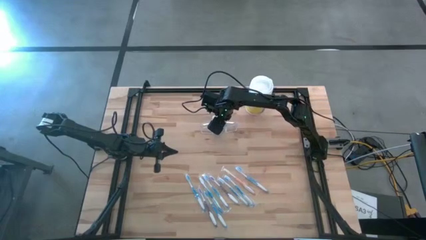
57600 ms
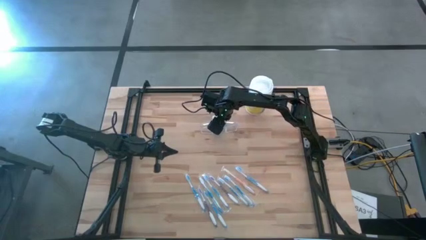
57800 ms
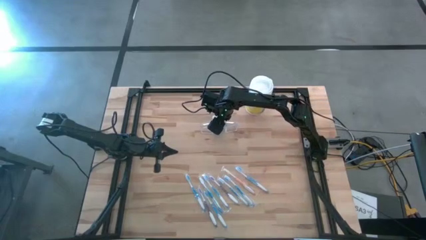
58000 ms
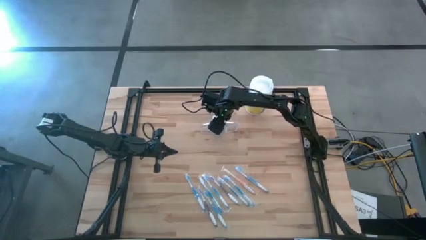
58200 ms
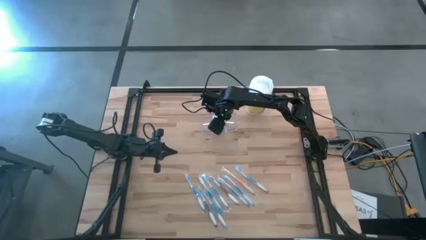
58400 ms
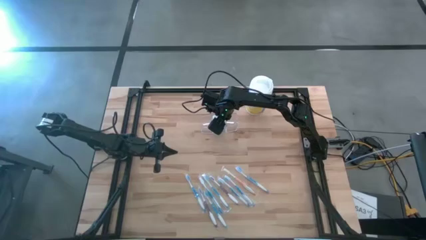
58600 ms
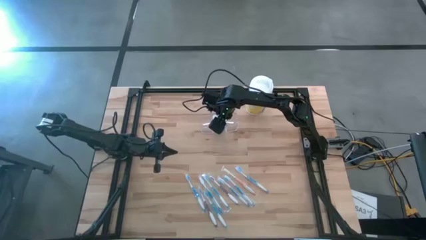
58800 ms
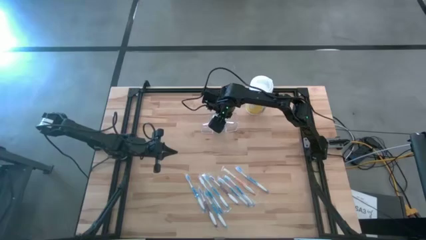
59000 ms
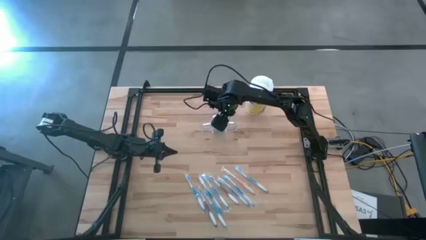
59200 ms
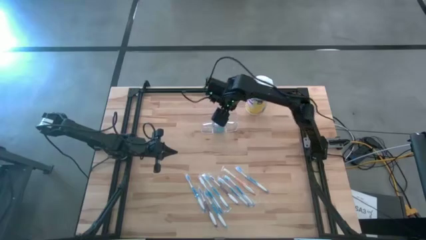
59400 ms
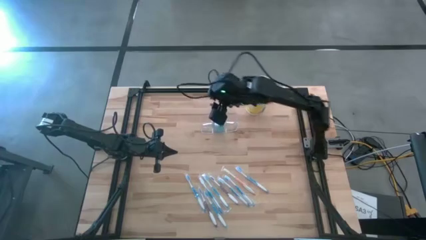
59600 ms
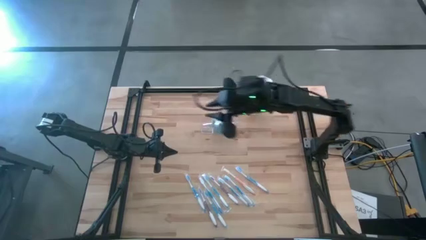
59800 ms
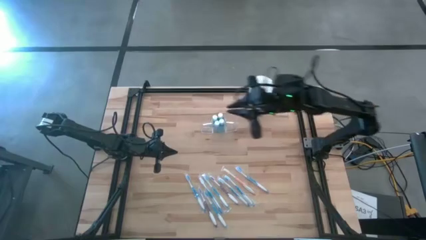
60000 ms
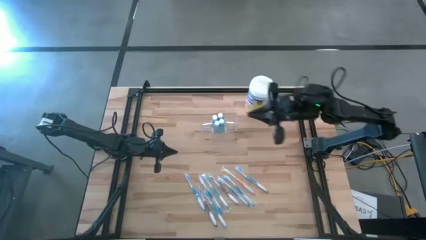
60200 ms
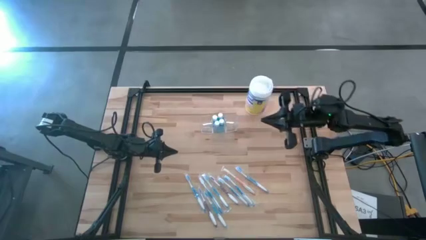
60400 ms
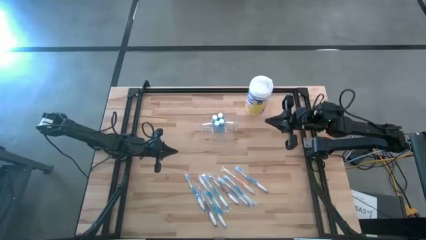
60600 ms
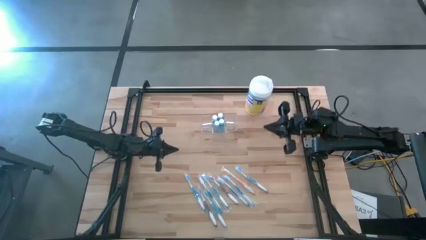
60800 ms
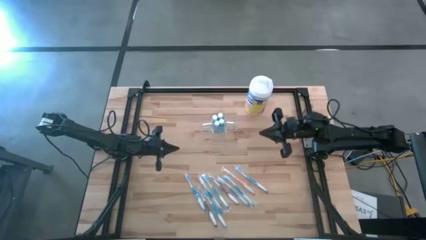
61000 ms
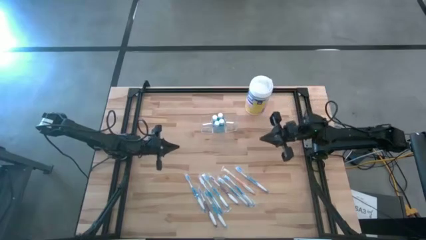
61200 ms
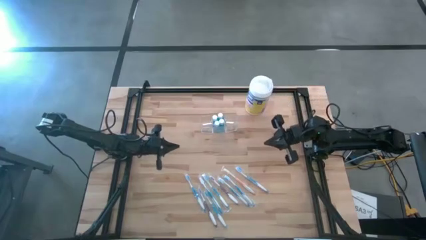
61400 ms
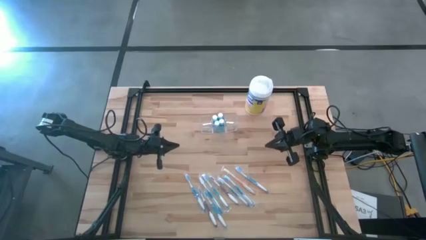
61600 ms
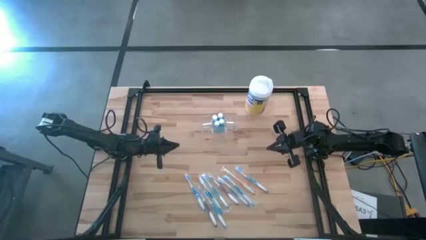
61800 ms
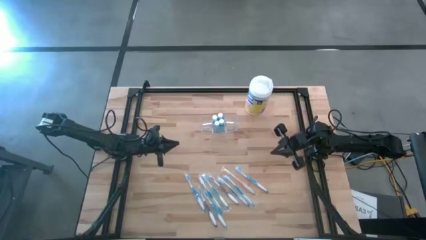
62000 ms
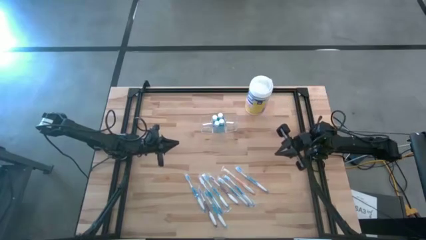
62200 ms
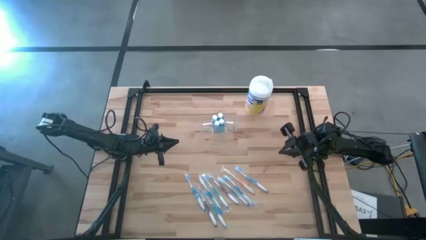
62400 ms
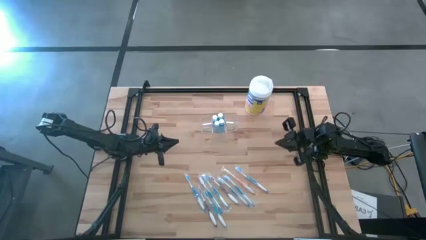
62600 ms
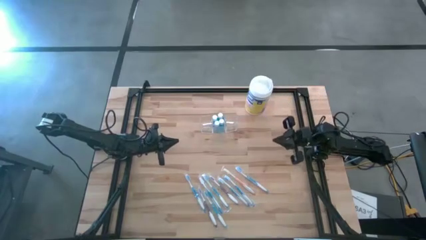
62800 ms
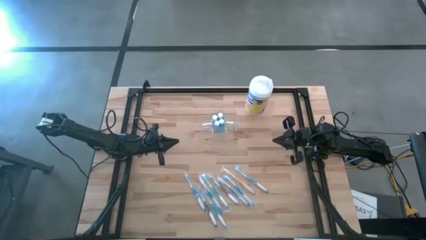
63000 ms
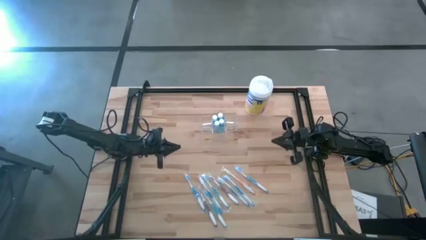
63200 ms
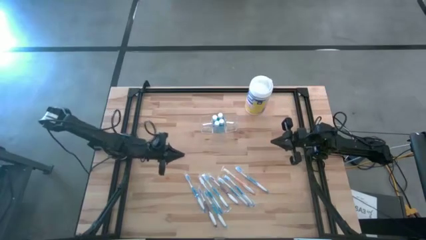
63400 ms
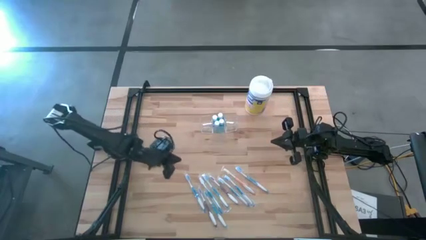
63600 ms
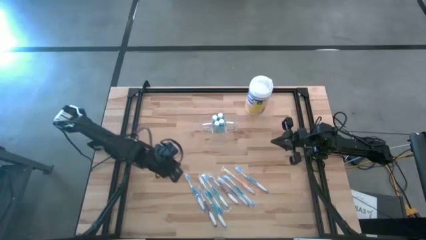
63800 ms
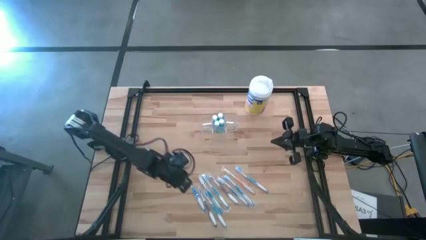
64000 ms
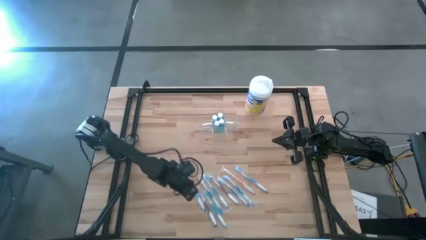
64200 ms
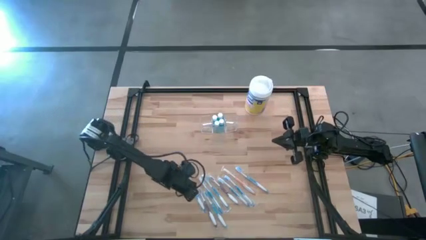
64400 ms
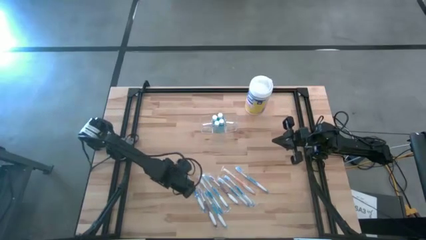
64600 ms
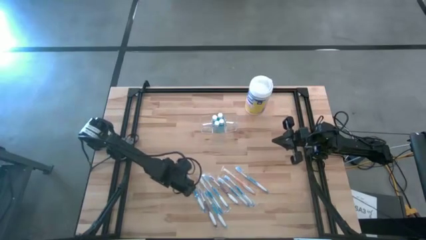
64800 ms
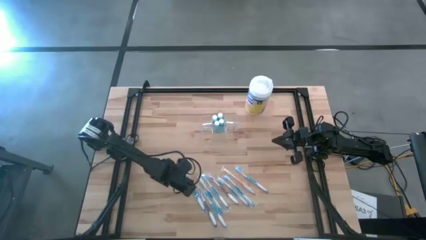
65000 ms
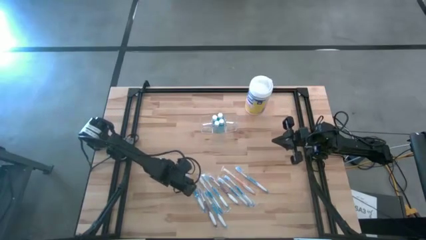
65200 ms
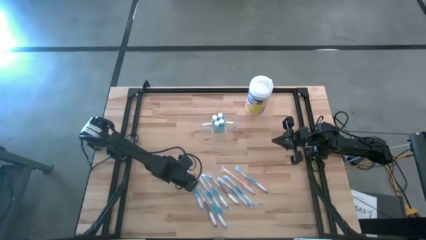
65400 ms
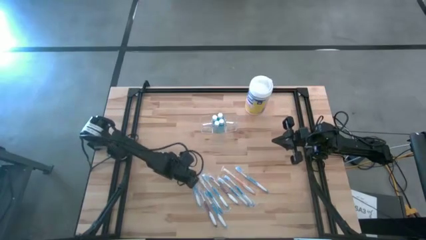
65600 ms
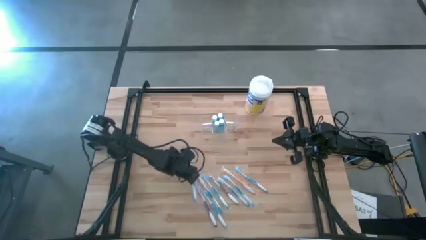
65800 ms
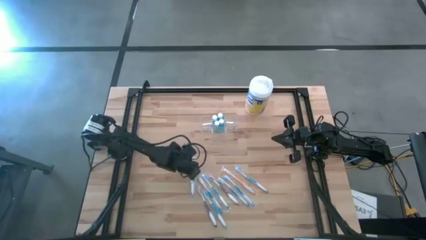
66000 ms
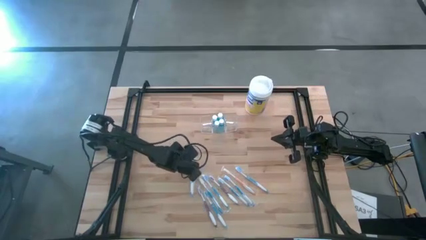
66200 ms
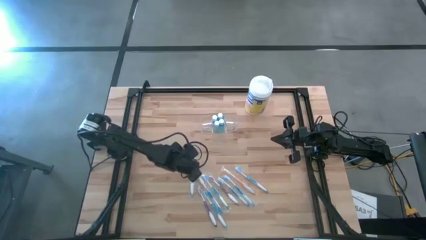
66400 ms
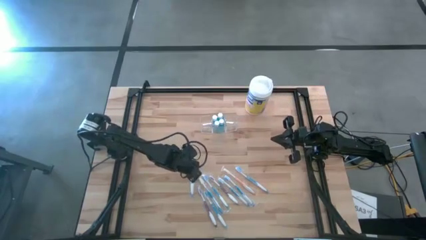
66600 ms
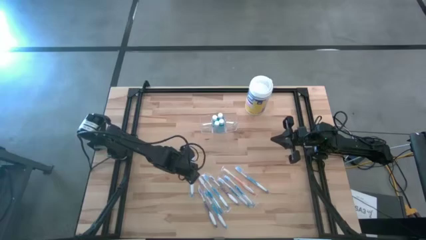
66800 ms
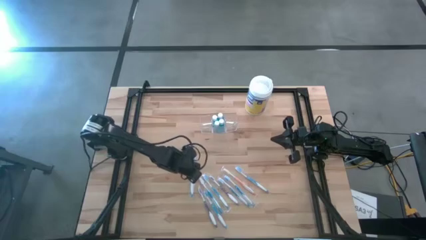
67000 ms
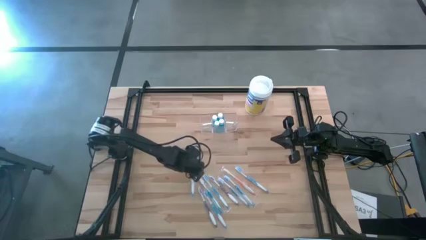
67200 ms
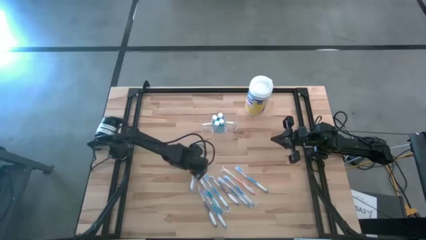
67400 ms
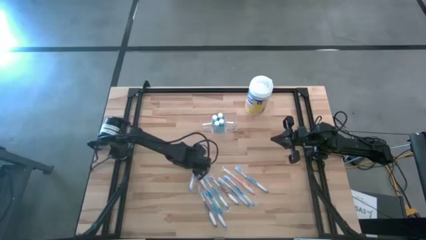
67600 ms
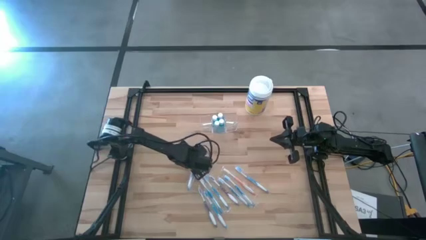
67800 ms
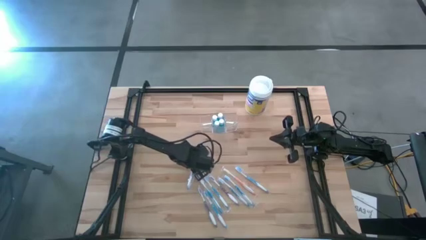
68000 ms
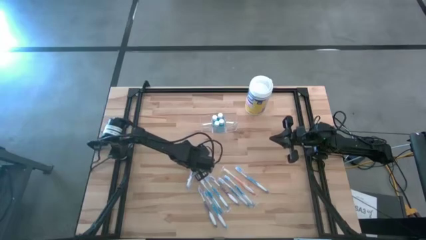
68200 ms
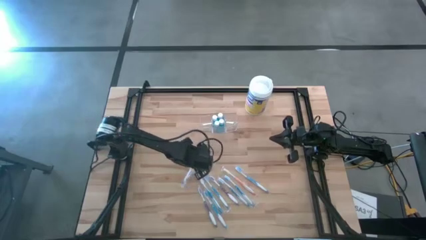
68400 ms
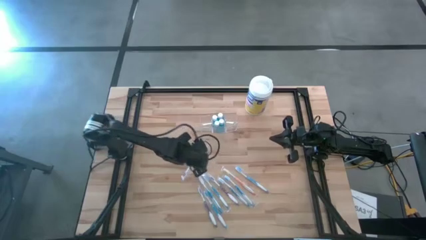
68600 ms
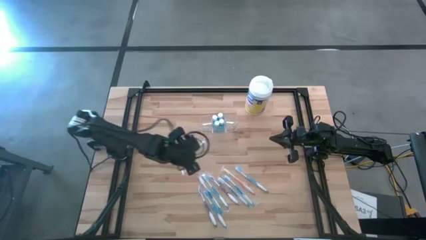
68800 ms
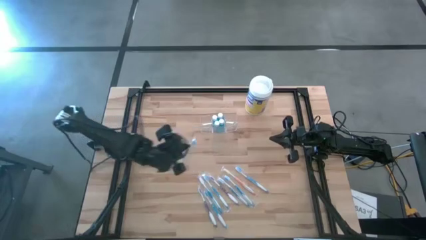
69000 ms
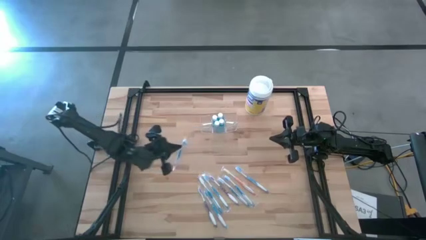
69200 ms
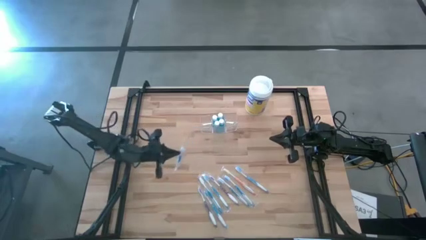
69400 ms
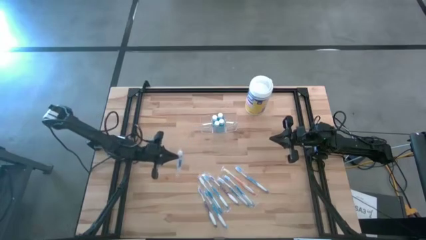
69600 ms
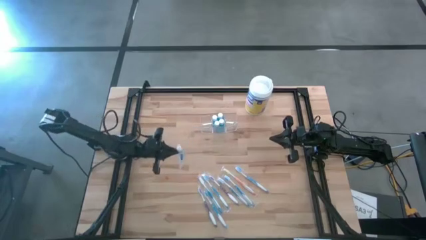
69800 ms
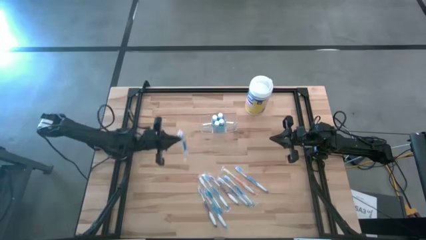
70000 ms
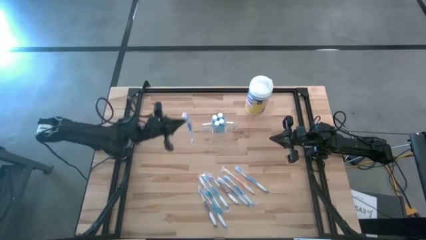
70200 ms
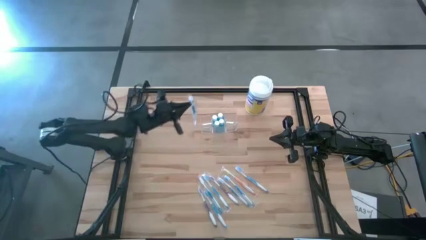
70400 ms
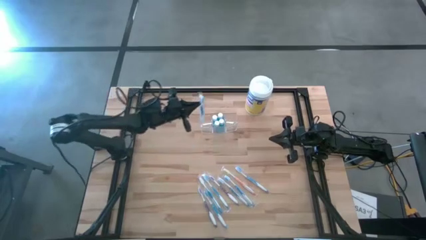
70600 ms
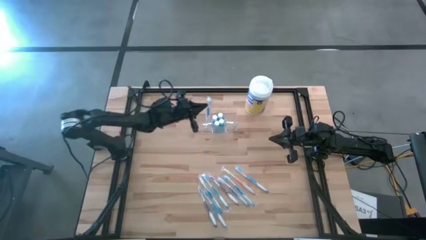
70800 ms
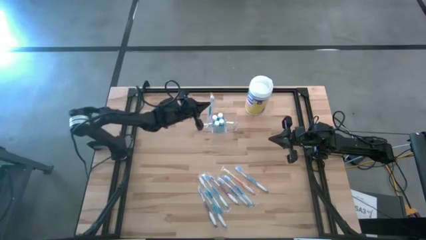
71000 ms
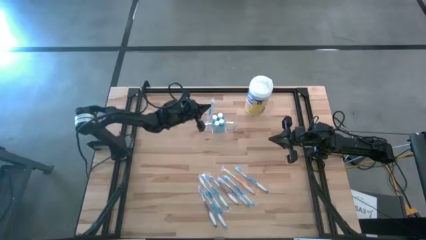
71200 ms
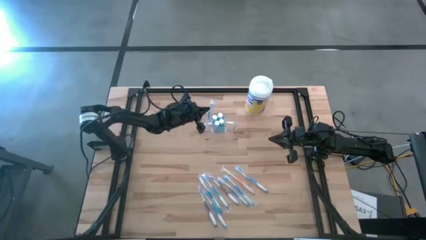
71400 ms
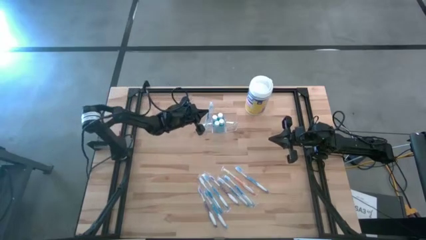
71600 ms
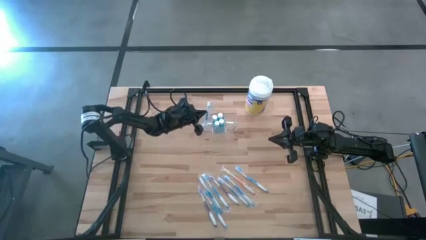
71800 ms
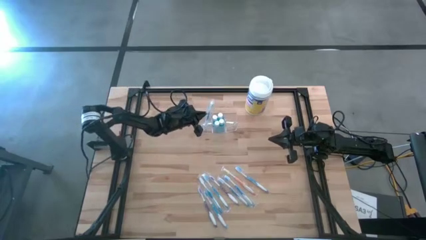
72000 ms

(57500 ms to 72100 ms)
Task: Pick & Place toothbrushing station
Put the blue toothbrush into the transparent organizer
